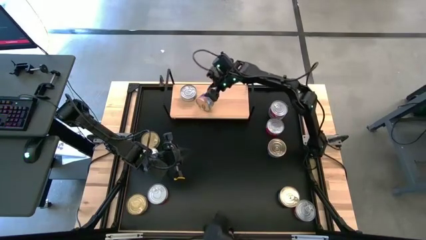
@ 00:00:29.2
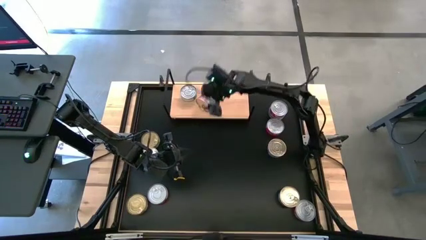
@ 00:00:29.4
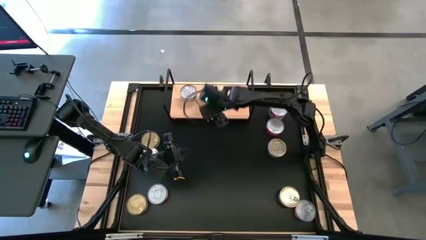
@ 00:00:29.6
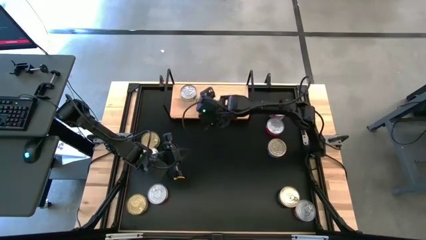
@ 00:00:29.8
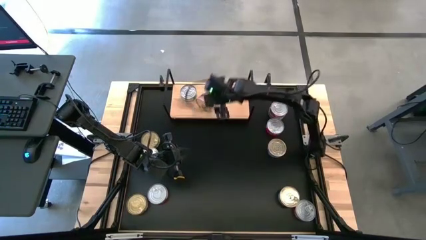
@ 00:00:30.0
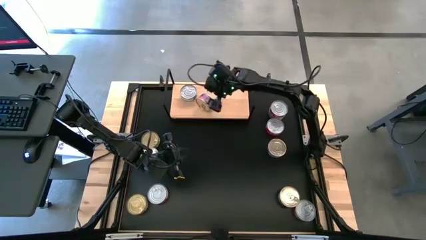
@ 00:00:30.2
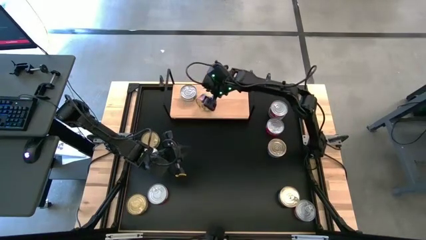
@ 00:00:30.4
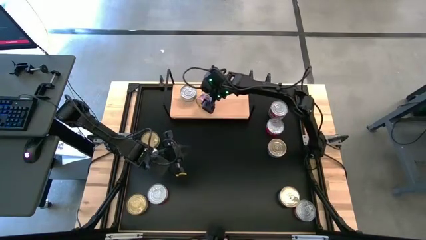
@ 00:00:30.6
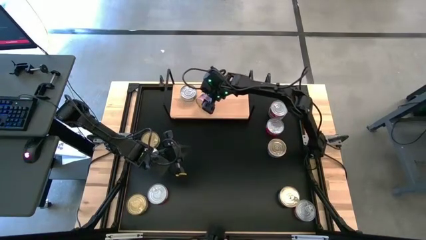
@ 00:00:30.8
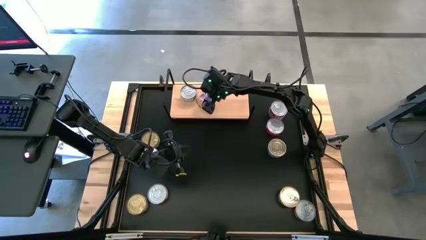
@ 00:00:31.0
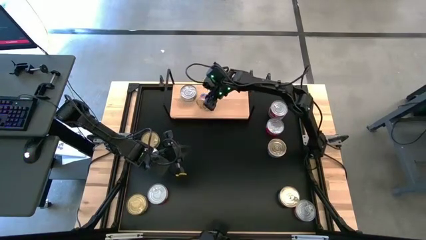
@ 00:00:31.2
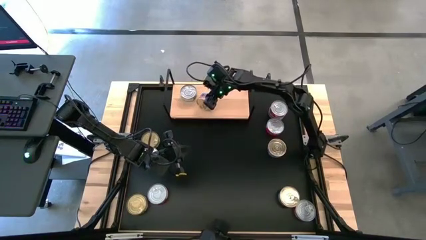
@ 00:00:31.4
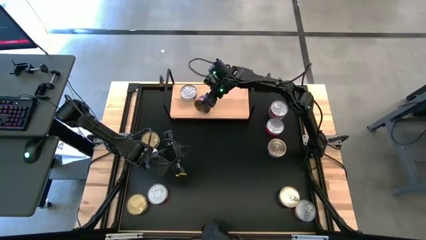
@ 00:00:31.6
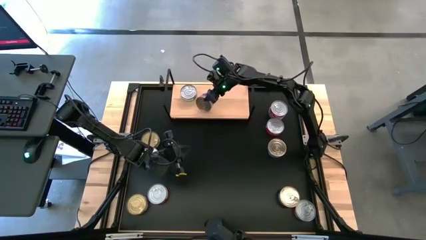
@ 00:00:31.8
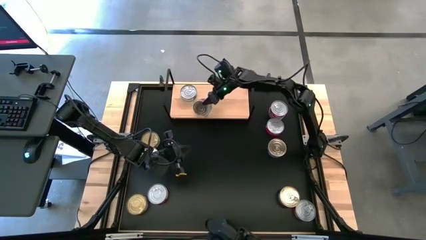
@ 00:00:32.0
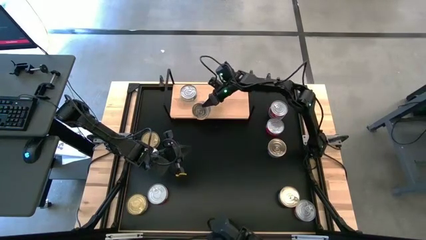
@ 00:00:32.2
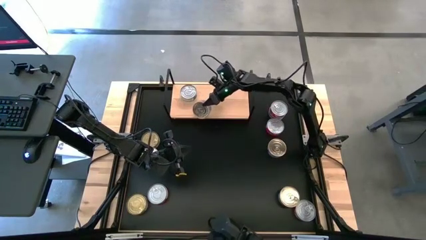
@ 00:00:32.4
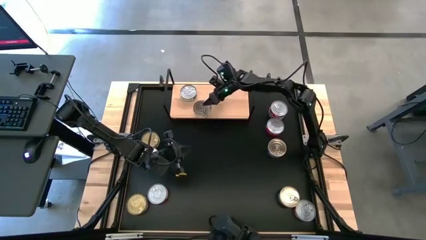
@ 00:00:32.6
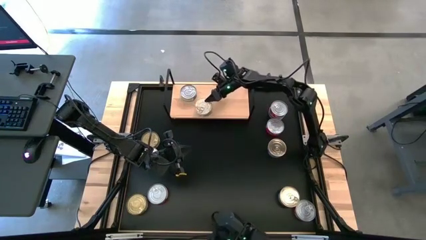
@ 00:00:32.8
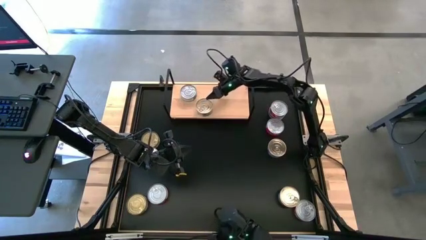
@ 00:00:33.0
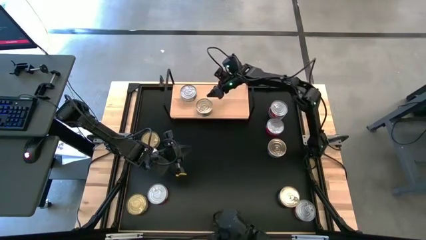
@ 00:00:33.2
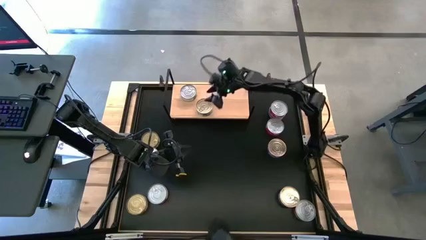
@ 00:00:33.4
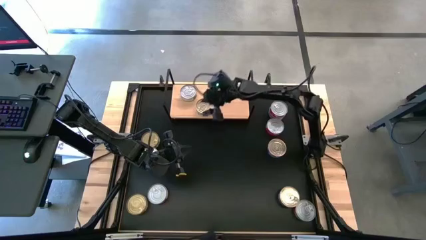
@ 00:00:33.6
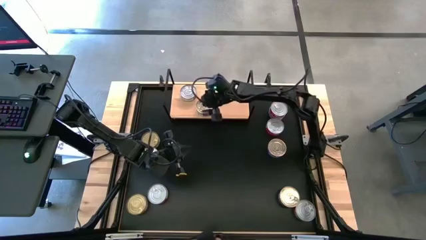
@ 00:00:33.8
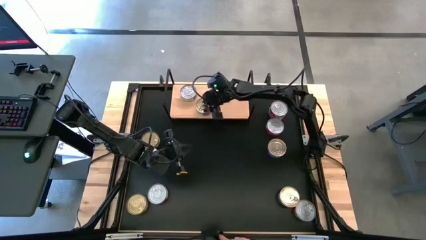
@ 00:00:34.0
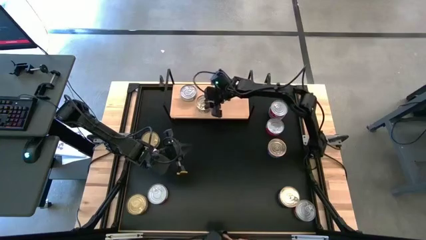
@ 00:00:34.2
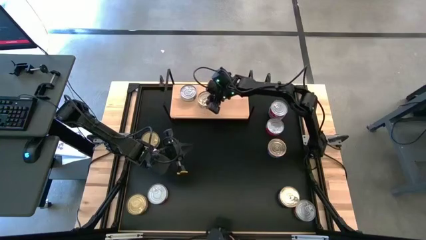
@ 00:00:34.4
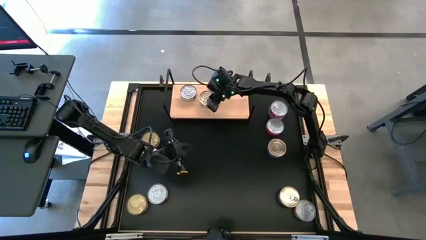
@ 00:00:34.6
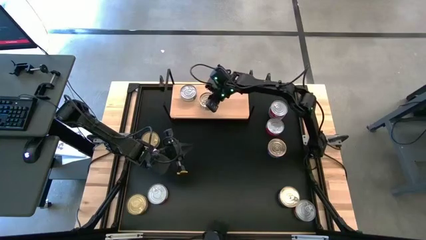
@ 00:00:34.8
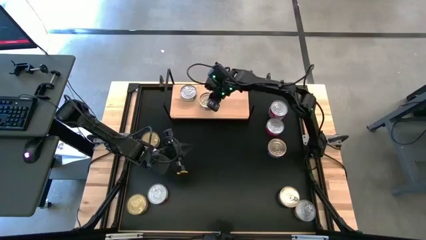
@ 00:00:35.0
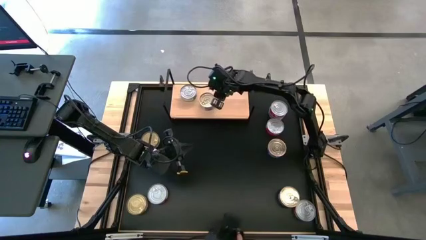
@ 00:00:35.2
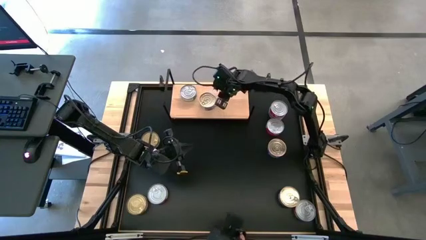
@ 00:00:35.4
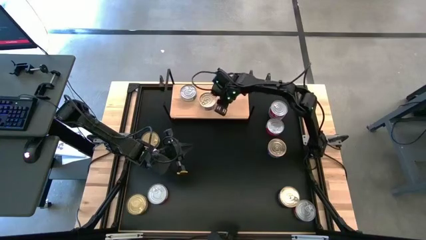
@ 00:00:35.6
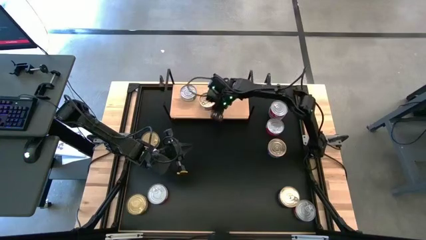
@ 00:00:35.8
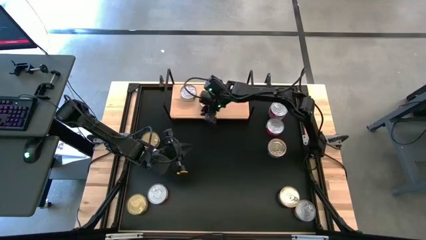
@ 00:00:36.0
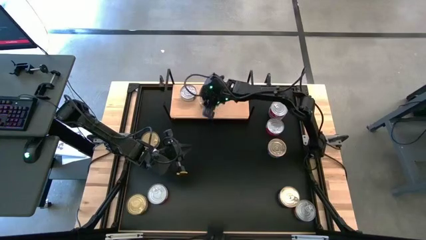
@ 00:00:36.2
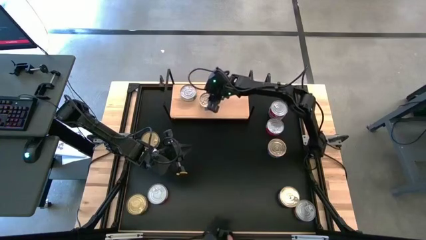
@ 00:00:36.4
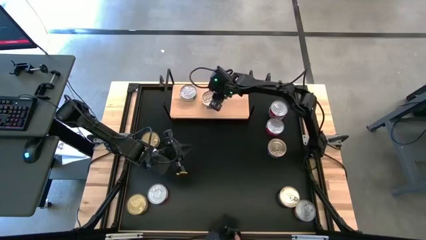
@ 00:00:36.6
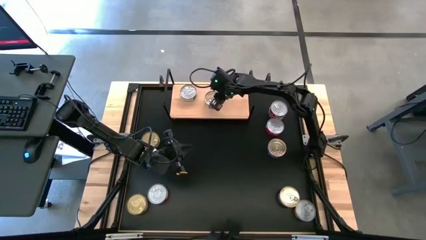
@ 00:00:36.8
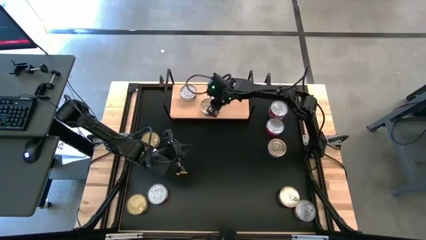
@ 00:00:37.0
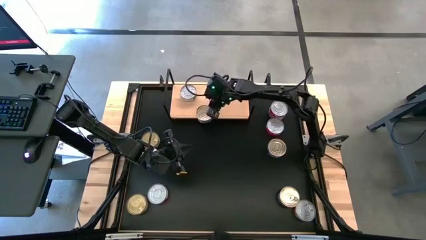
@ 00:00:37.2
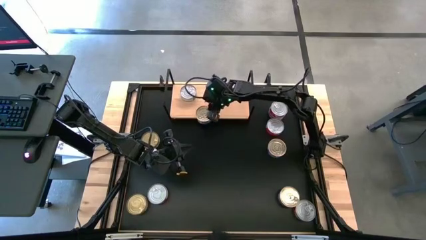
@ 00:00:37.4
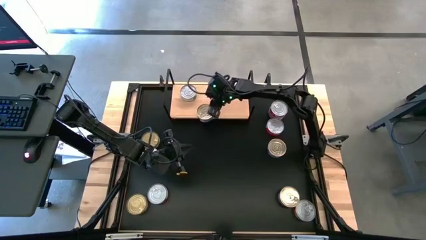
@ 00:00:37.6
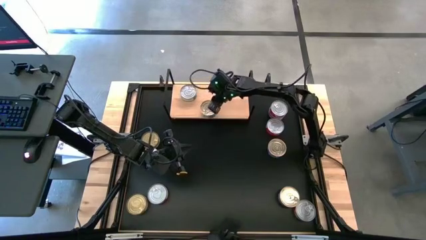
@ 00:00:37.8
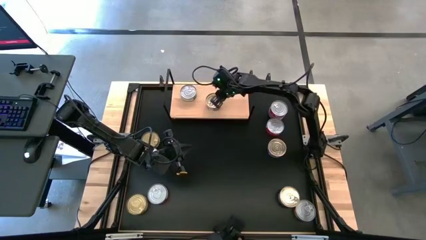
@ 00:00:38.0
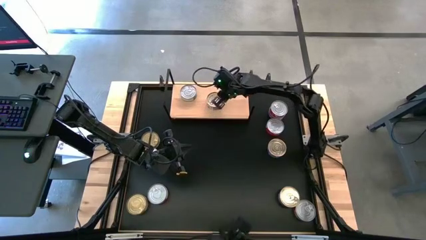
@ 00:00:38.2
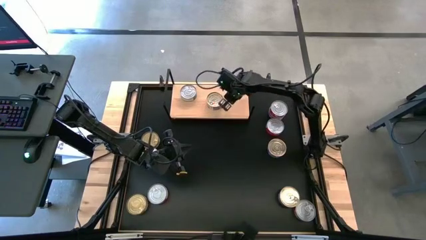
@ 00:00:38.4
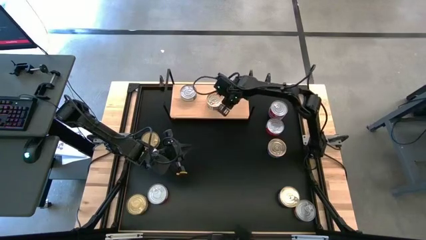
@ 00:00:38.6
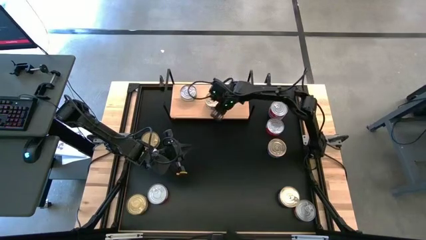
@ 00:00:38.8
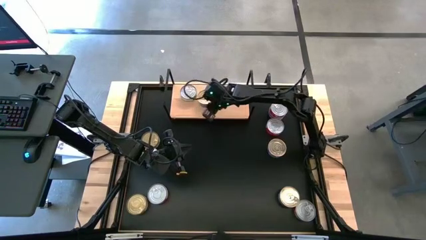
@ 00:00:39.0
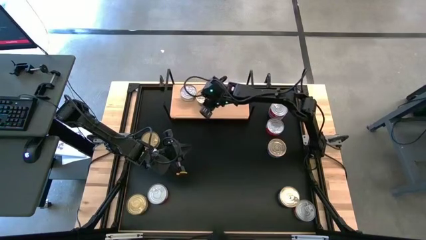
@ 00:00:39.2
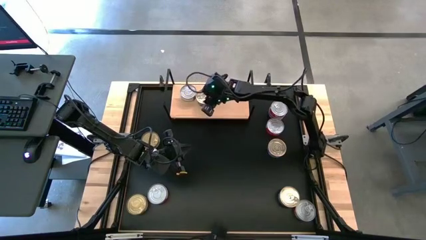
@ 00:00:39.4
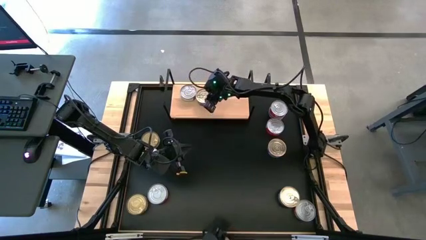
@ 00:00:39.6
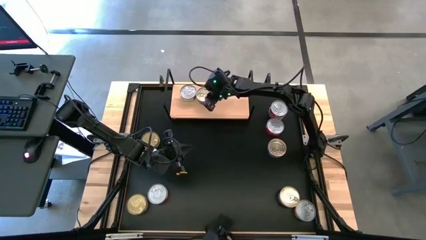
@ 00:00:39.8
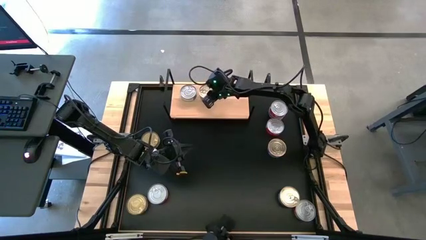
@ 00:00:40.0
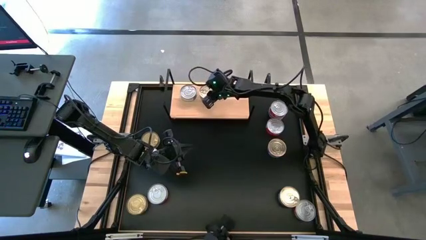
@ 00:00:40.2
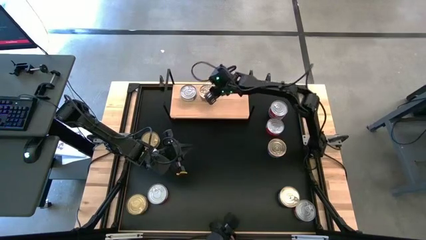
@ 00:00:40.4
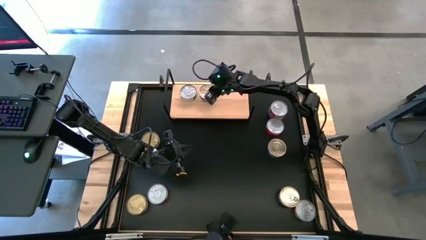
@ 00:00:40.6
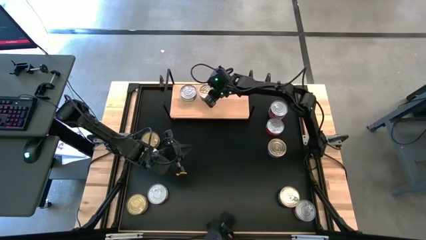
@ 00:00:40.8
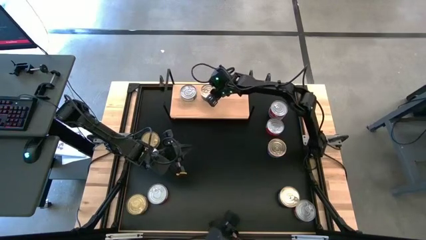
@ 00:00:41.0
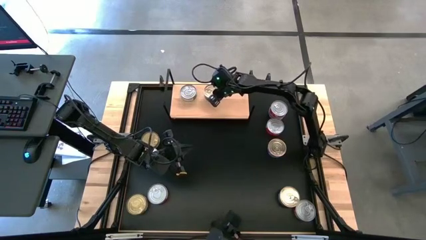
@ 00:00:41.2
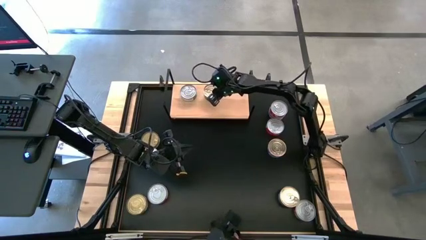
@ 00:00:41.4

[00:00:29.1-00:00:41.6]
Task: Stack canned seafood by type on shelf
Put the blue-pink tuna can on the shelf

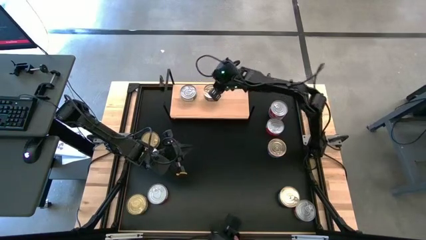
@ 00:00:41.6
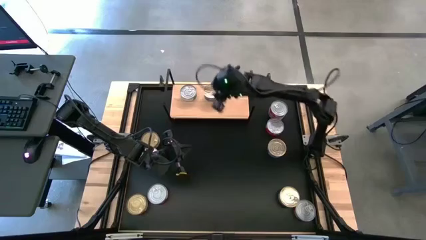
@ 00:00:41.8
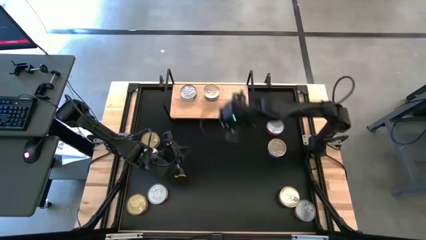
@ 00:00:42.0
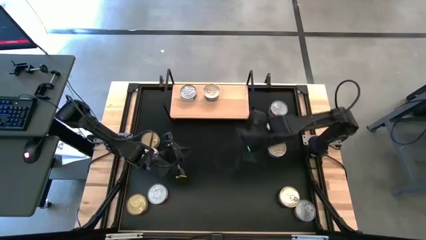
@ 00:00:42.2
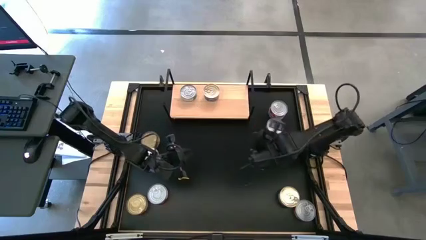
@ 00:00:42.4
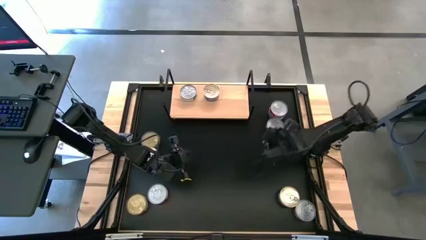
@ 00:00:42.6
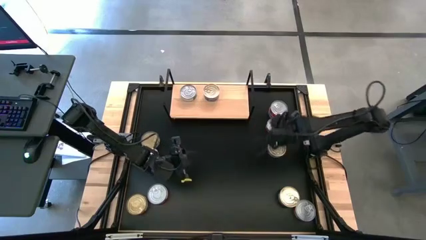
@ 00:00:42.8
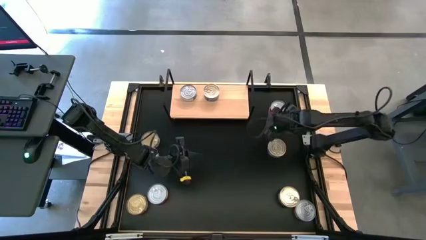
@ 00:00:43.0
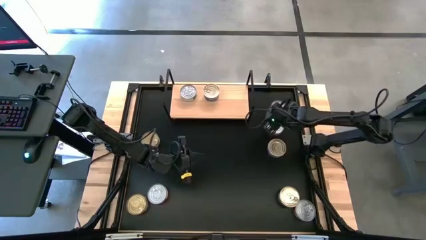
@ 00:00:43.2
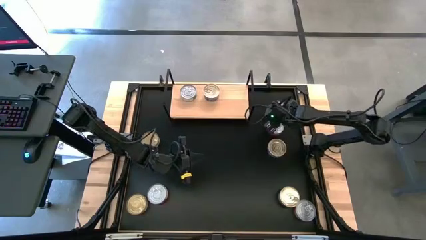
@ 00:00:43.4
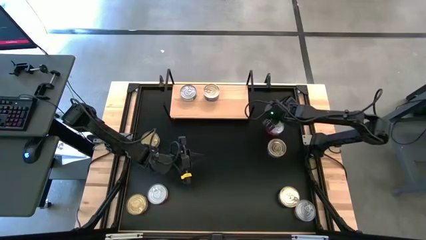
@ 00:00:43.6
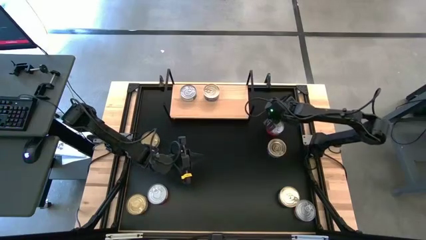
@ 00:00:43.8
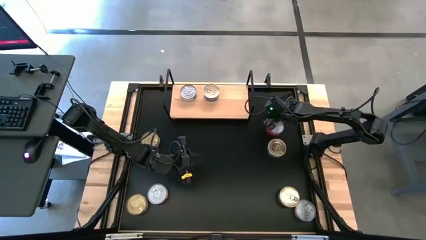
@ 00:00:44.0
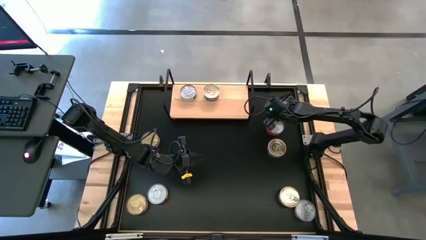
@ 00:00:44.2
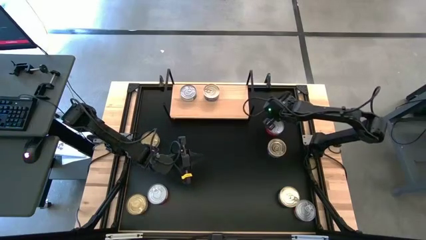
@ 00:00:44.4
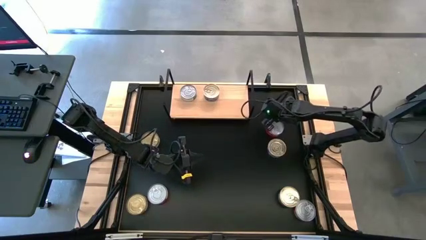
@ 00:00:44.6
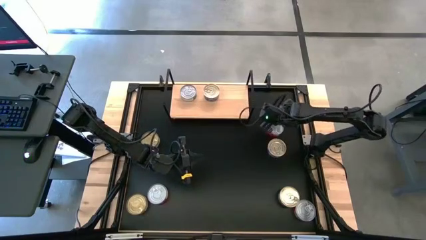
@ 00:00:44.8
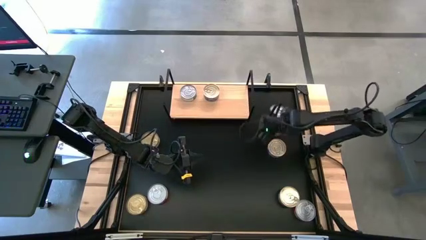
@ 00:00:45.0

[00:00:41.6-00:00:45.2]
Put the red tuna can on the shelf
